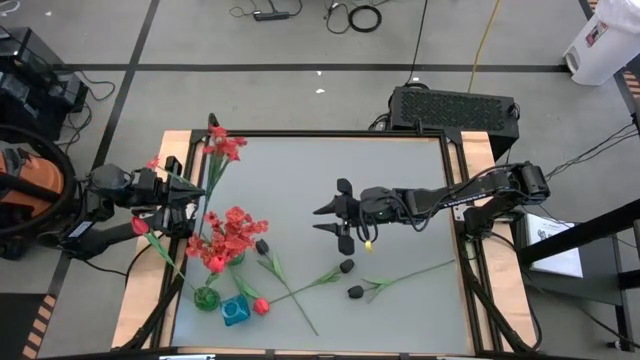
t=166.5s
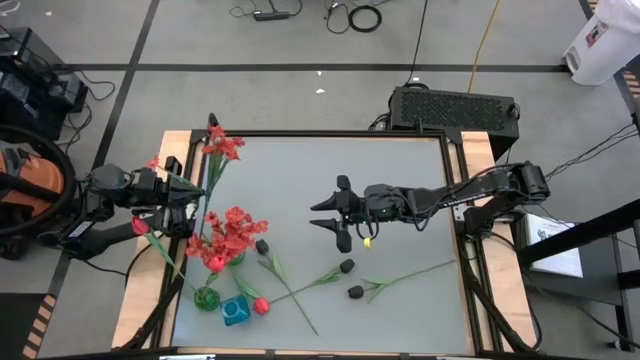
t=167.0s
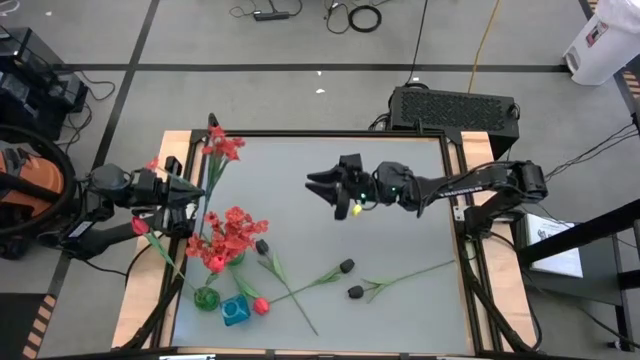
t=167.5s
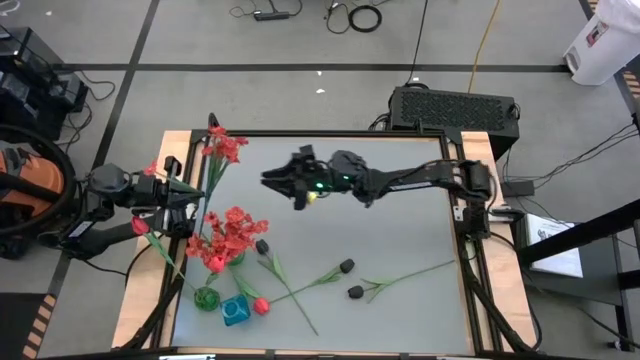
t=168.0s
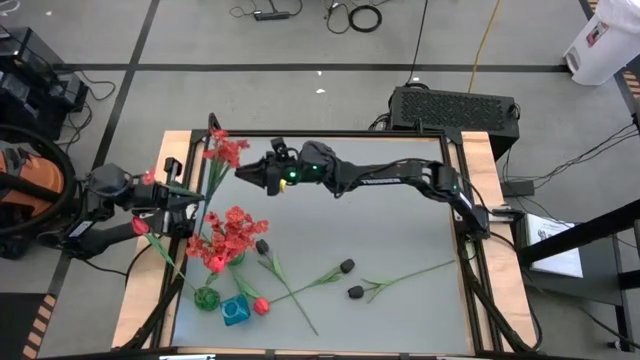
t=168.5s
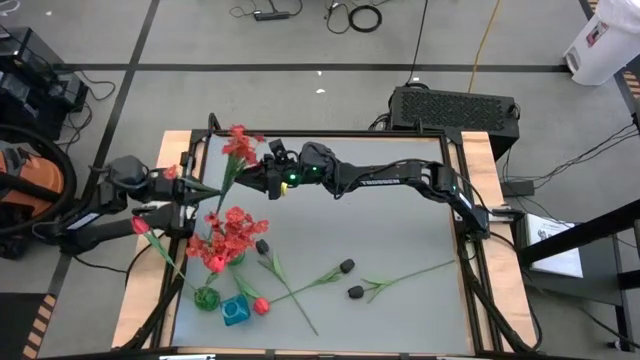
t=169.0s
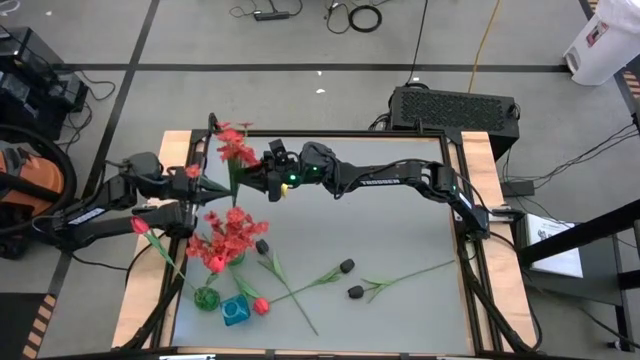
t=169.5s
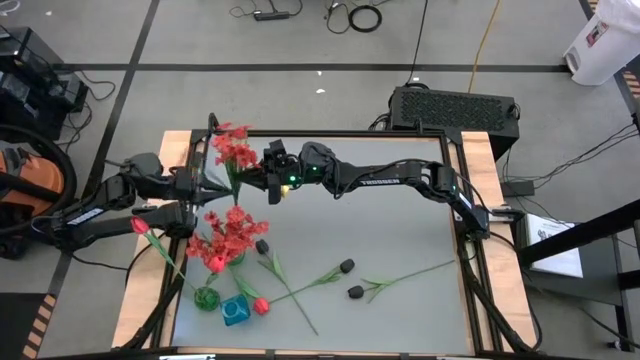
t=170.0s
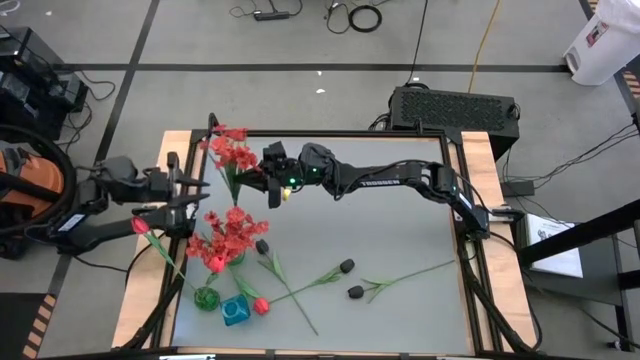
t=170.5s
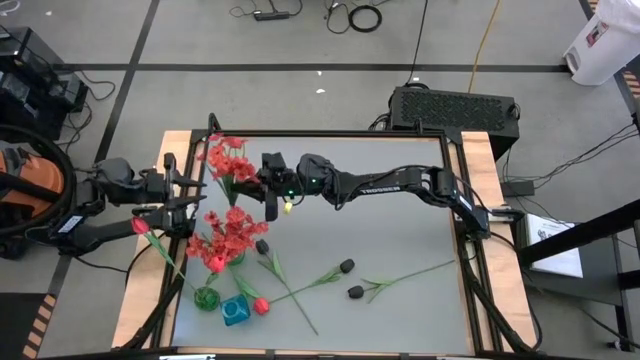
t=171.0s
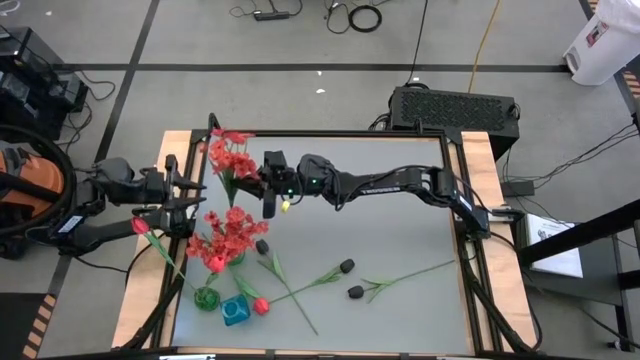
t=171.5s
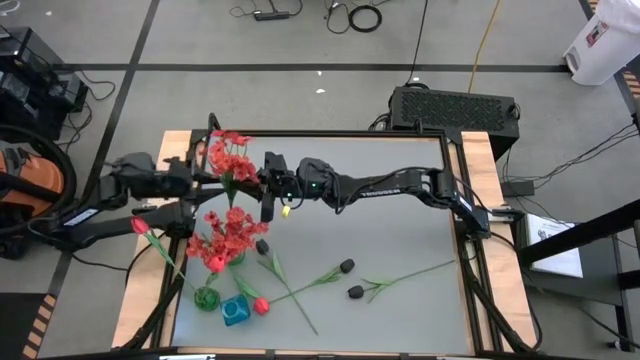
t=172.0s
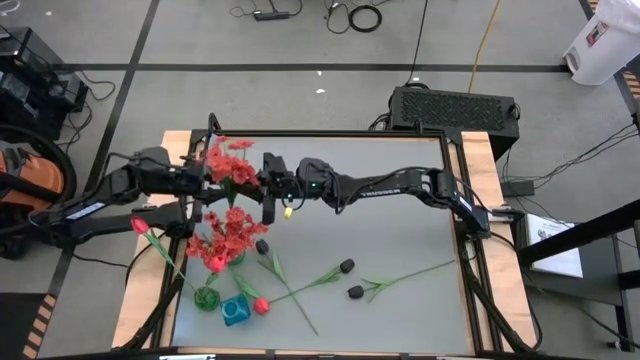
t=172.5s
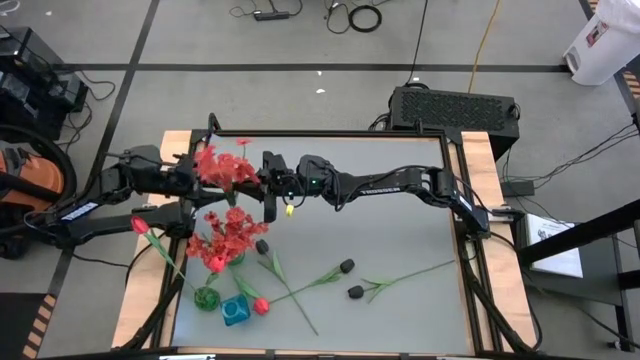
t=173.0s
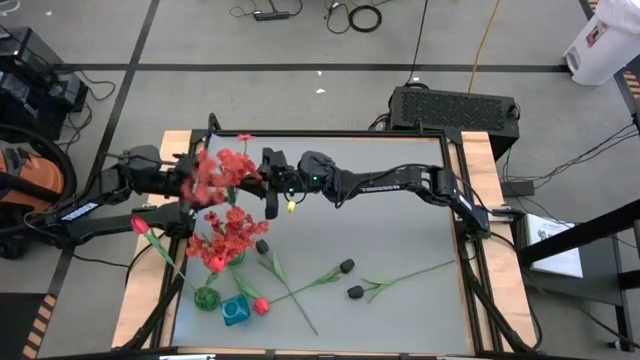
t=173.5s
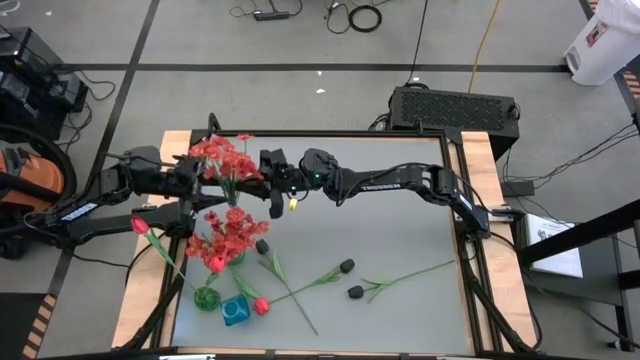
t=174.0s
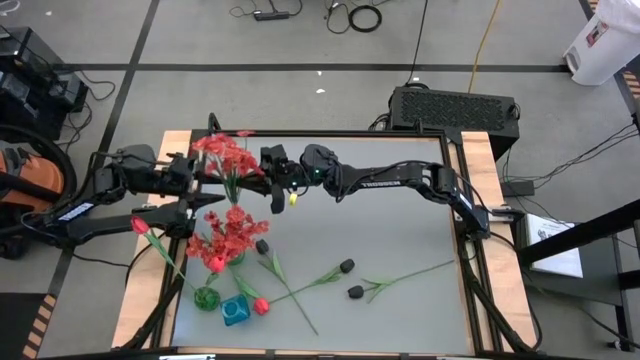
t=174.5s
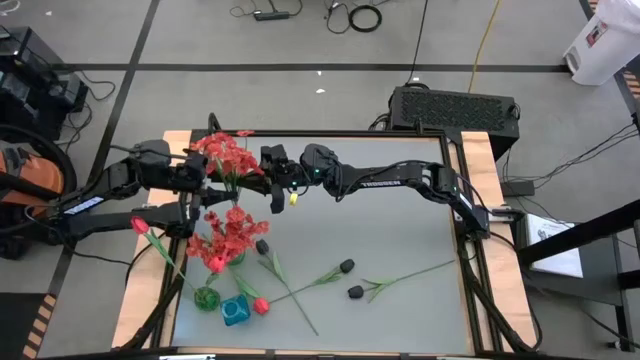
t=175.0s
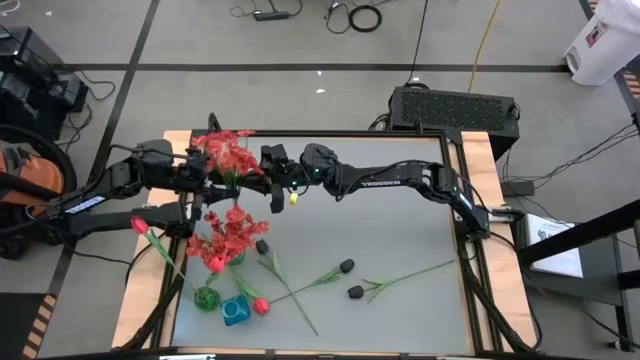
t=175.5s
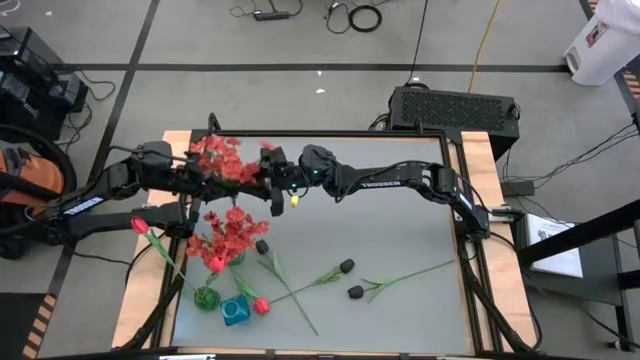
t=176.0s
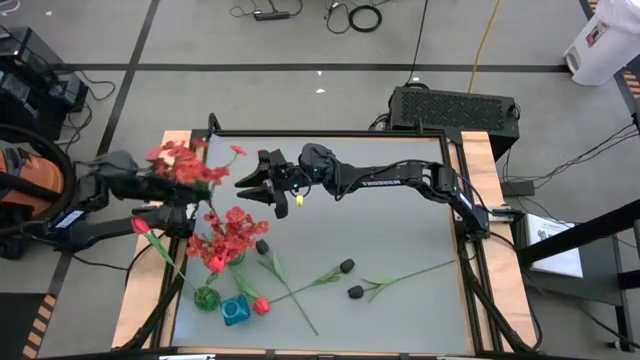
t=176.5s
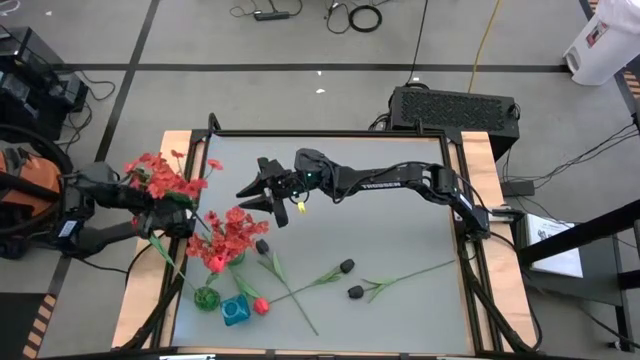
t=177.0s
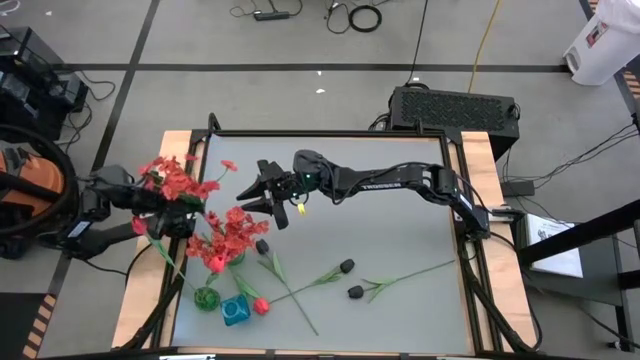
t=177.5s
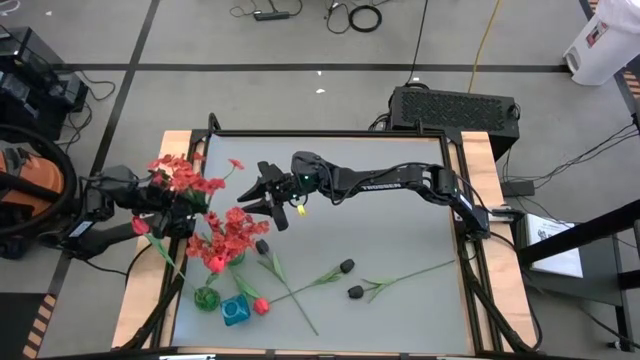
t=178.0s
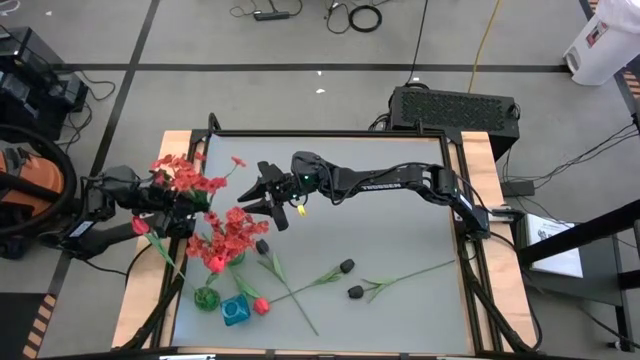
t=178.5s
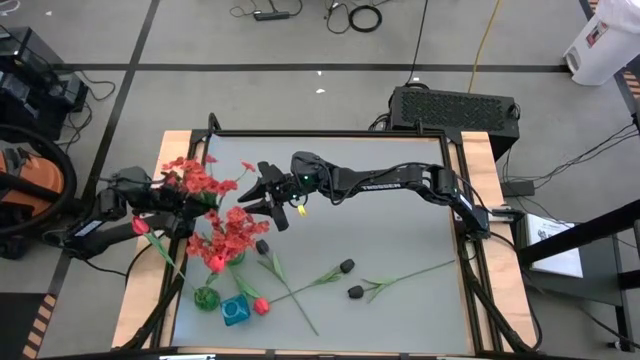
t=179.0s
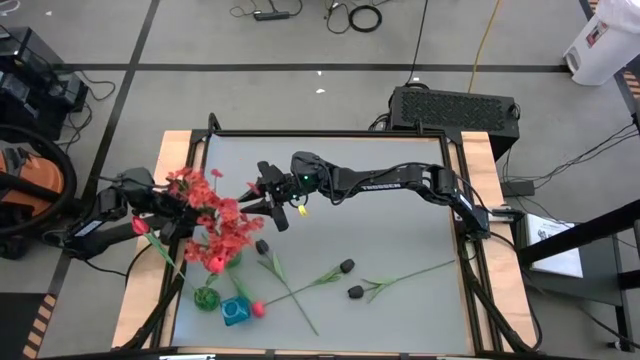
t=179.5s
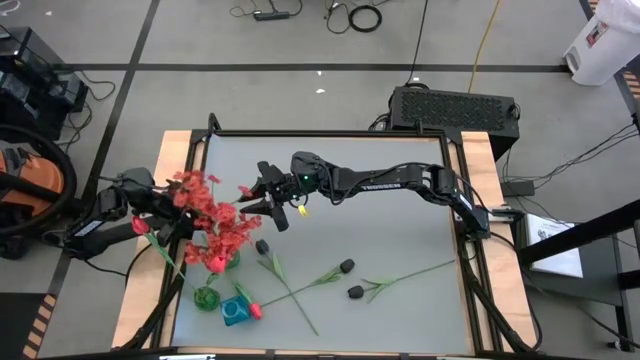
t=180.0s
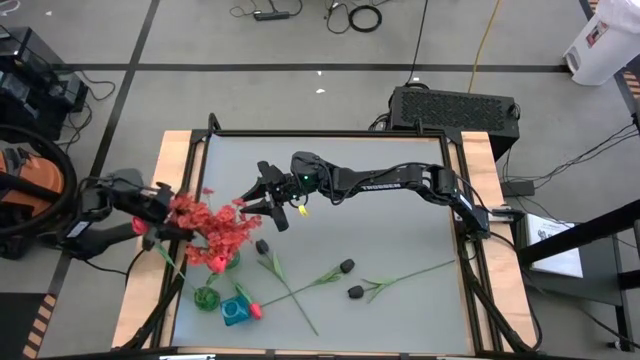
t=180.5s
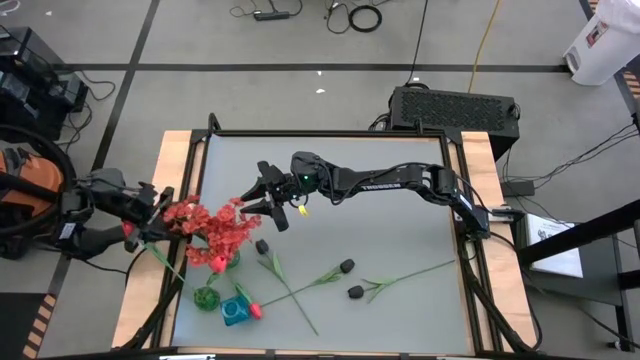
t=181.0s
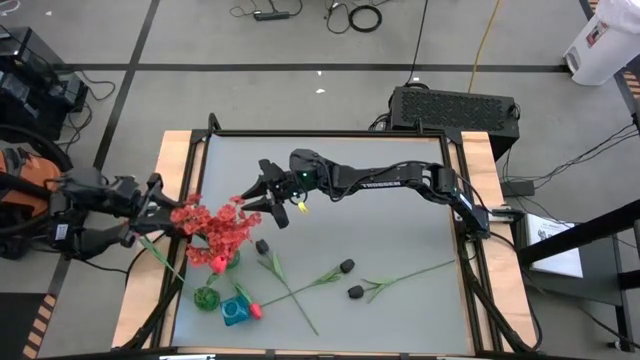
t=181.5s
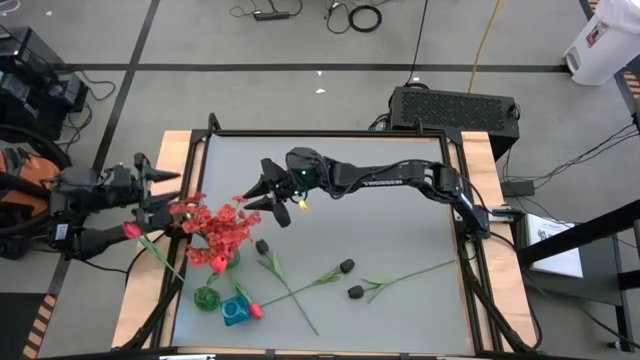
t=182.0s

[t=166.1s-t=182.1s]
Task: Sort flowers into vase by color
Put the orange flowers into the top green vase

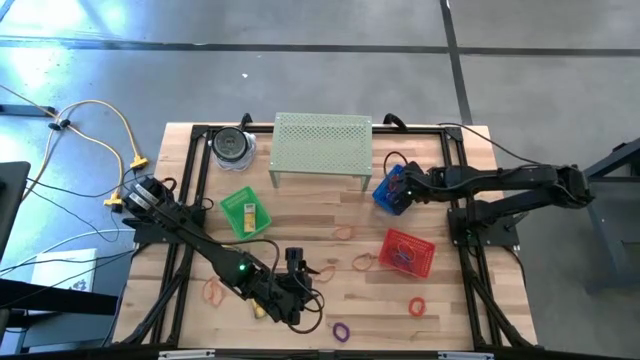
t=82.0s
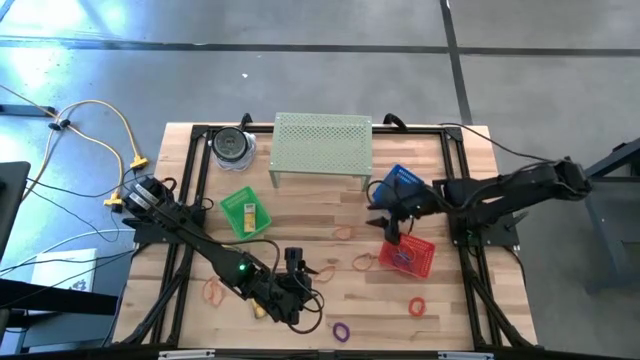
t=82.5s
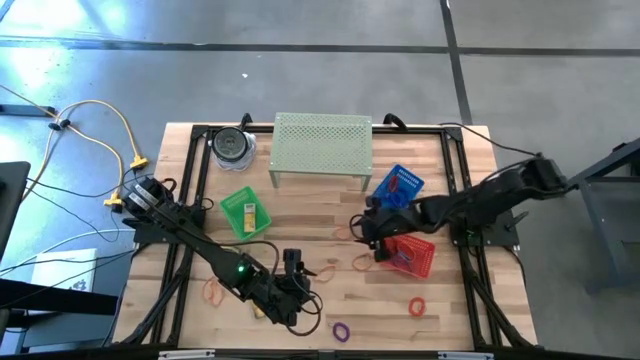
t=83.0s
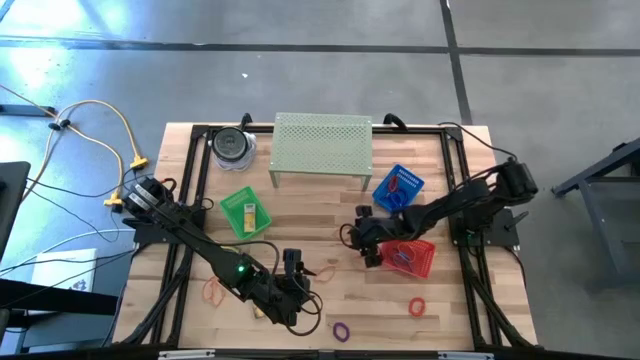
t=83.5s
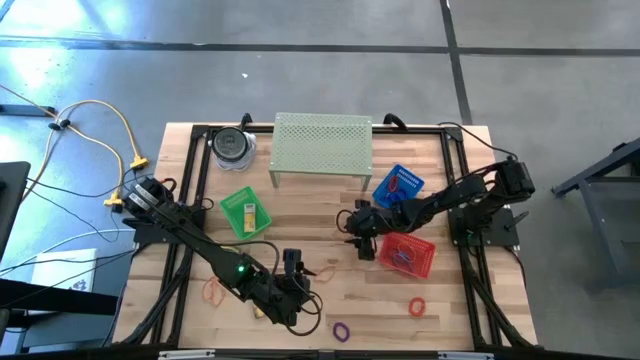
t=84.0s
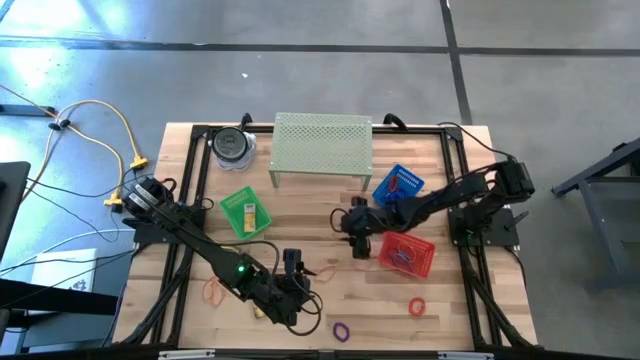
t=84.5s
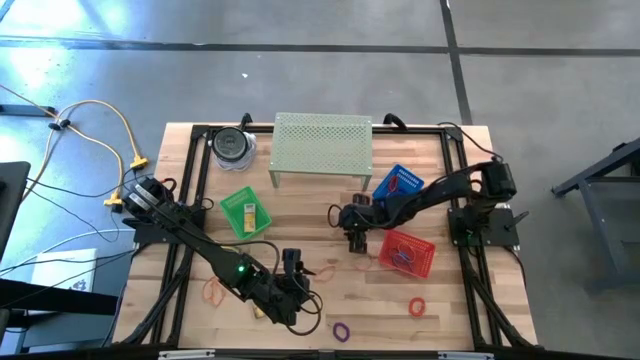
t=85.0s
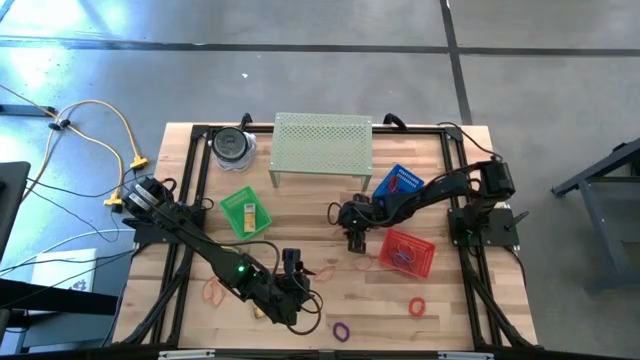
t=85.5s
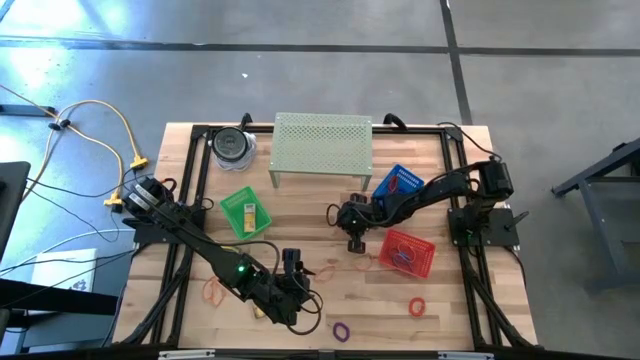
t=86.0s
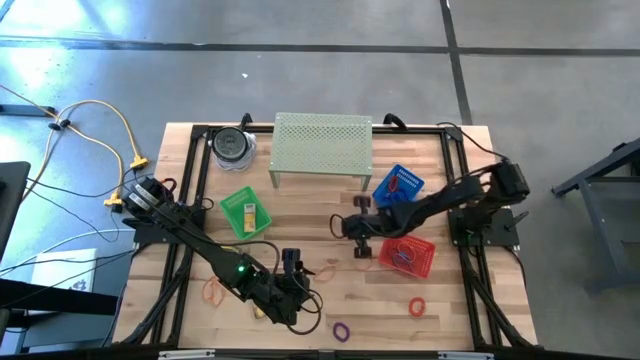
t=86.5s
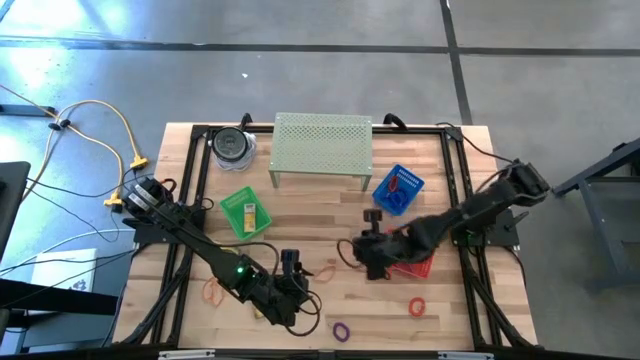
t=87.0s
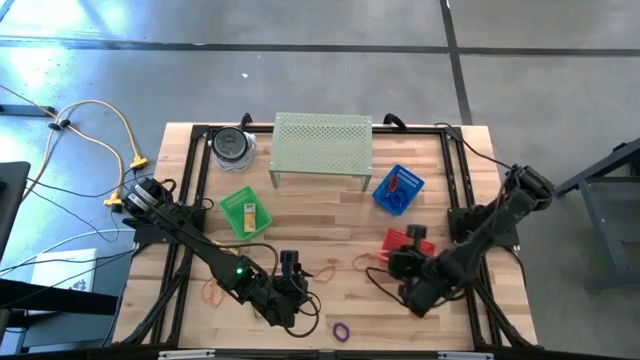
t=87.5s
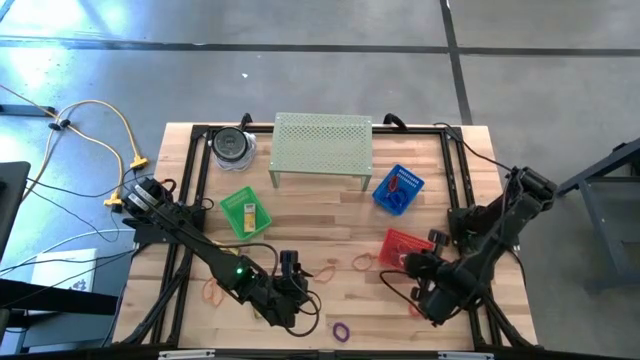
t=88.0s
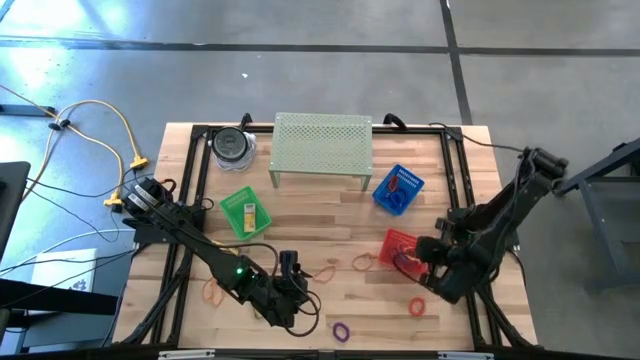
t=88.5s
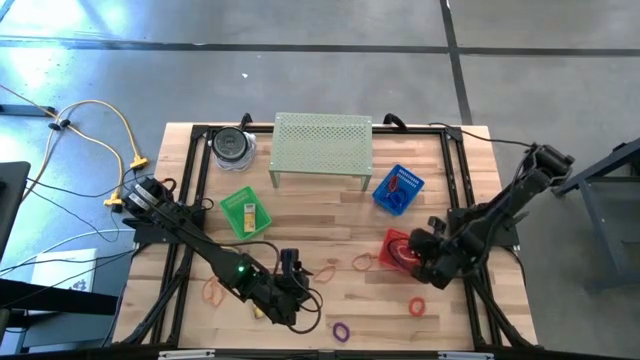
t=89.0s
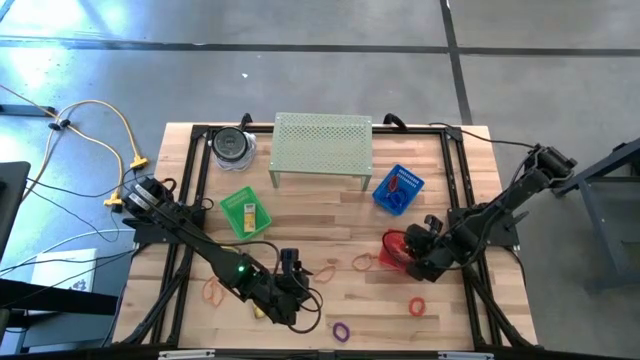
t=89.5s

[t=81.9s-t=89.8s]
Task: Pick & Place Office Desk Supplies
Put the orange rubberband into the red basket
